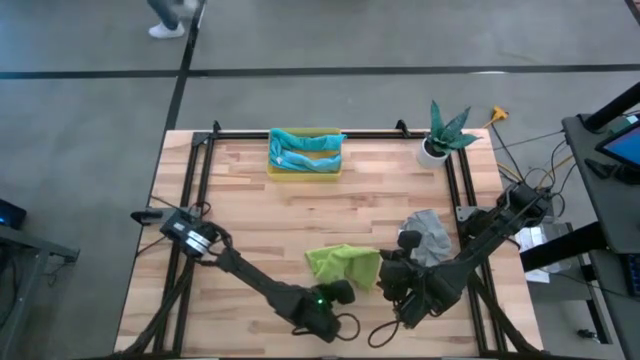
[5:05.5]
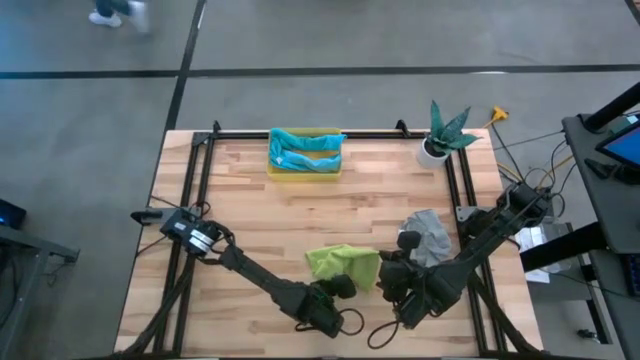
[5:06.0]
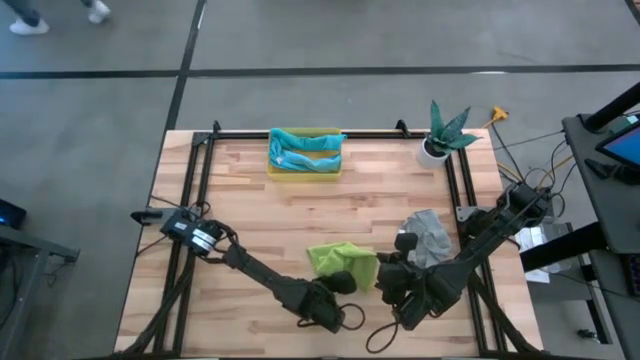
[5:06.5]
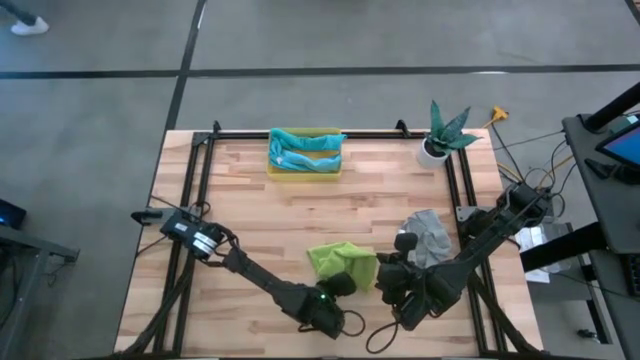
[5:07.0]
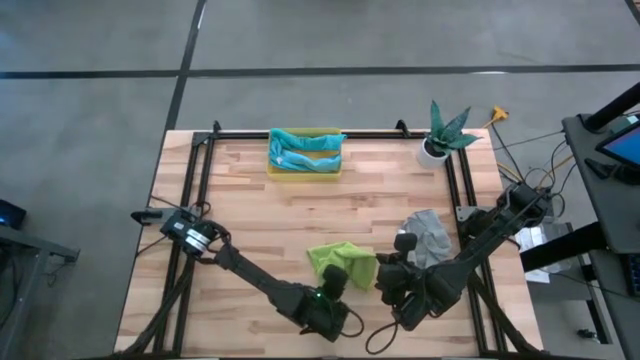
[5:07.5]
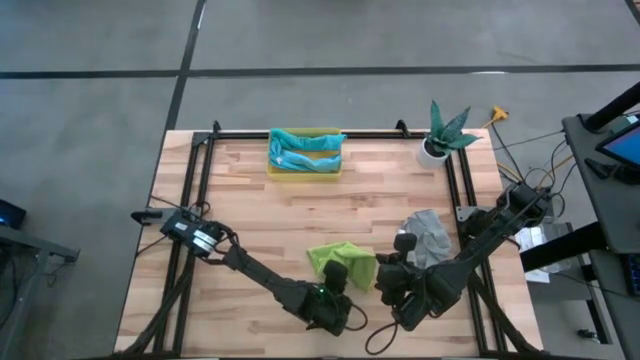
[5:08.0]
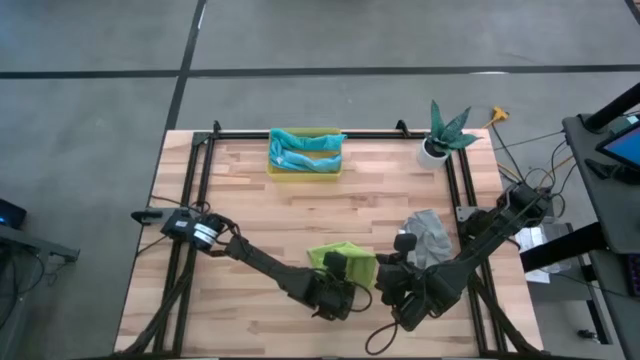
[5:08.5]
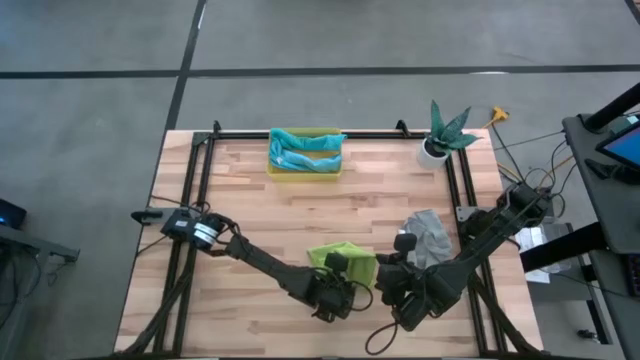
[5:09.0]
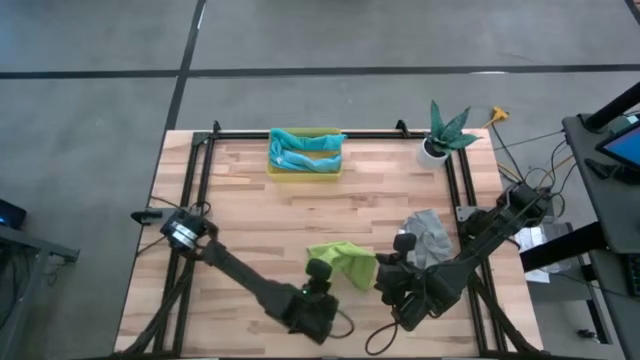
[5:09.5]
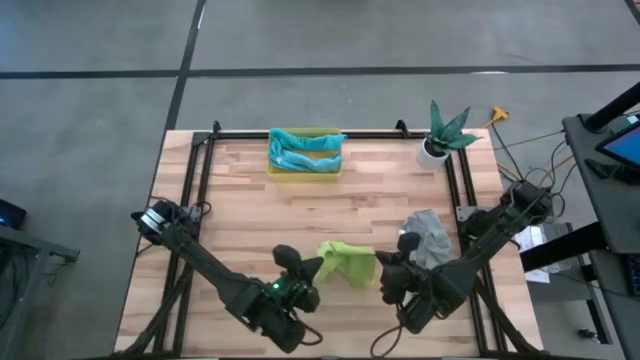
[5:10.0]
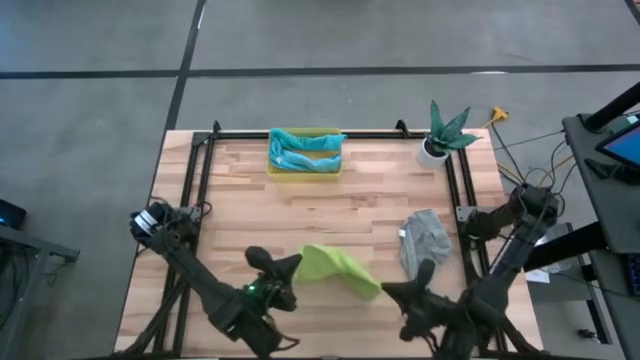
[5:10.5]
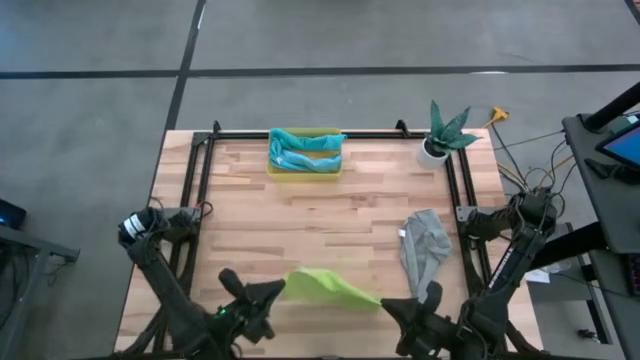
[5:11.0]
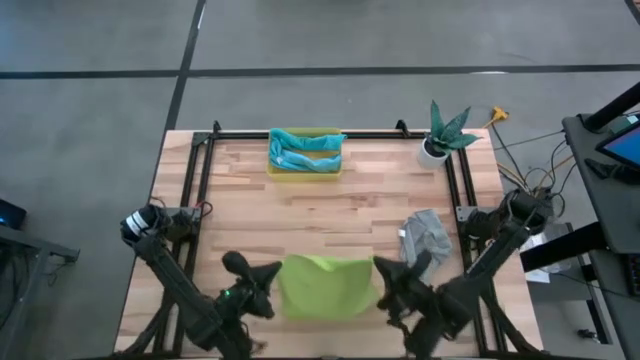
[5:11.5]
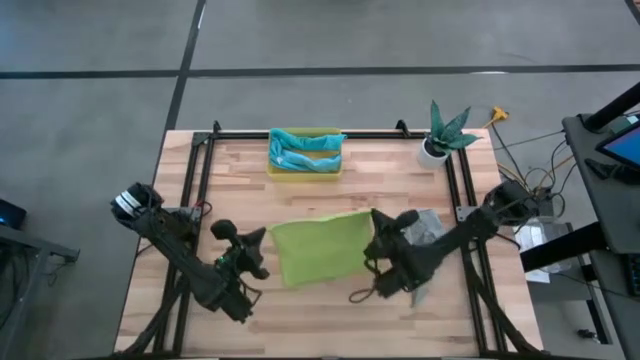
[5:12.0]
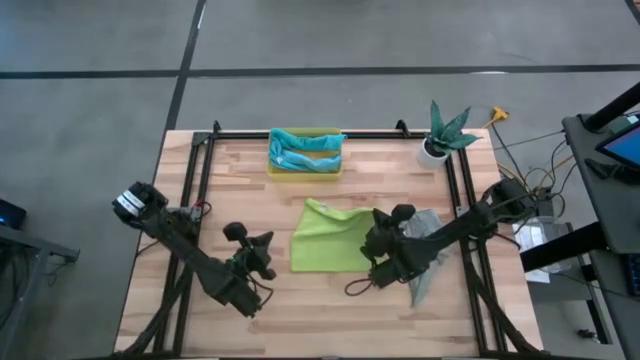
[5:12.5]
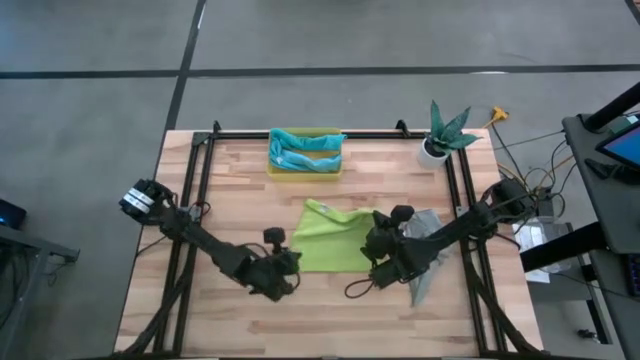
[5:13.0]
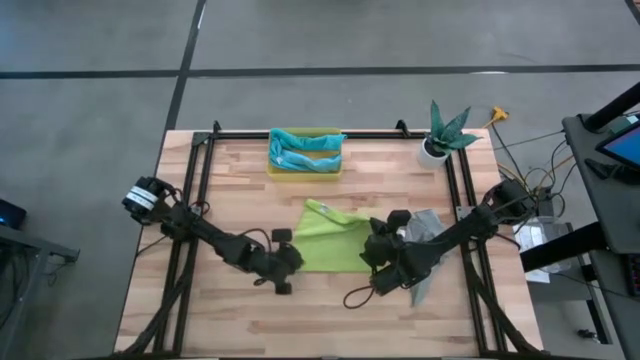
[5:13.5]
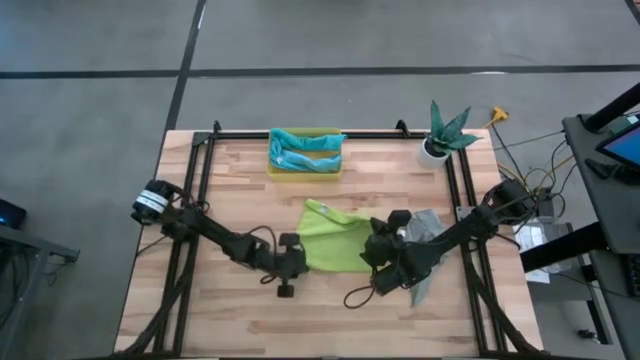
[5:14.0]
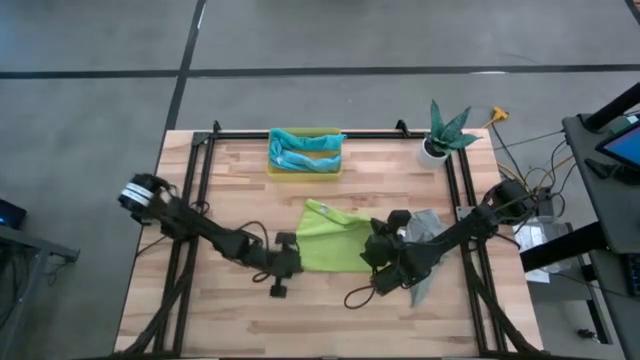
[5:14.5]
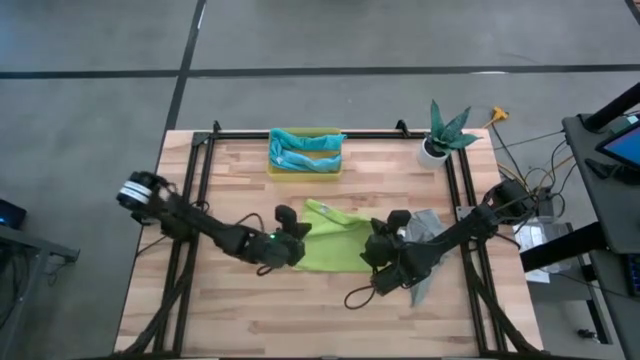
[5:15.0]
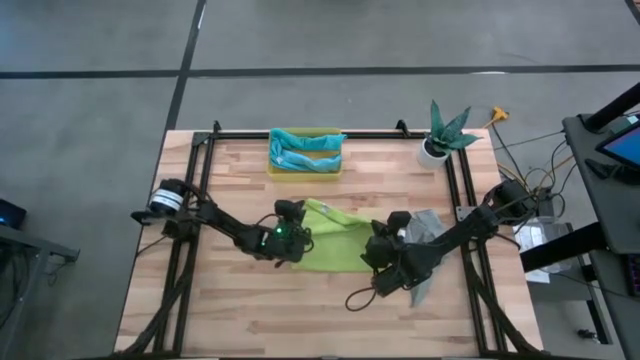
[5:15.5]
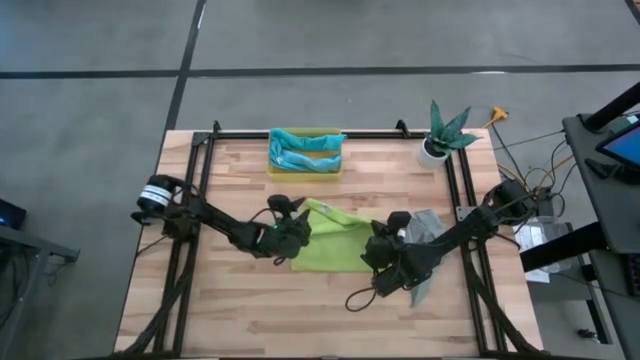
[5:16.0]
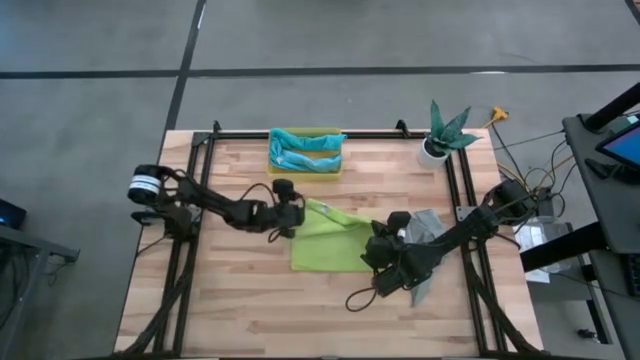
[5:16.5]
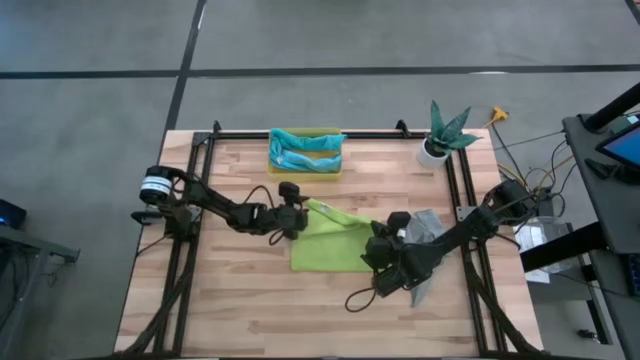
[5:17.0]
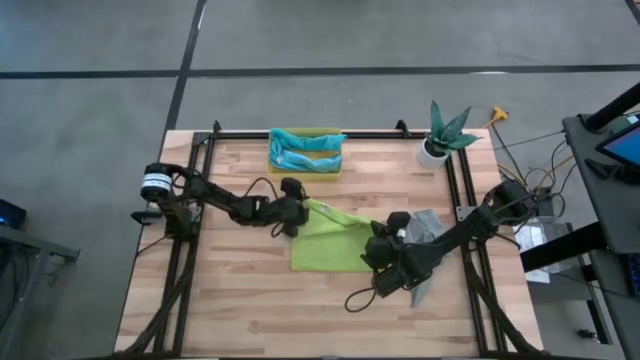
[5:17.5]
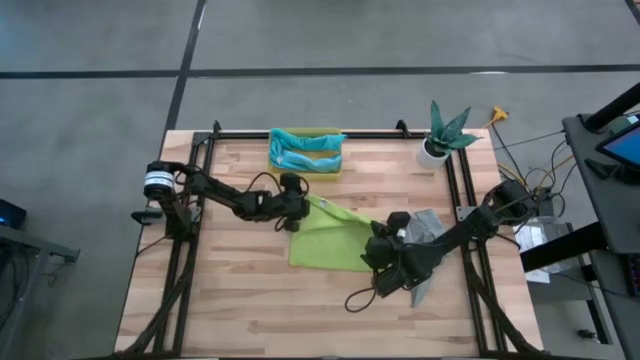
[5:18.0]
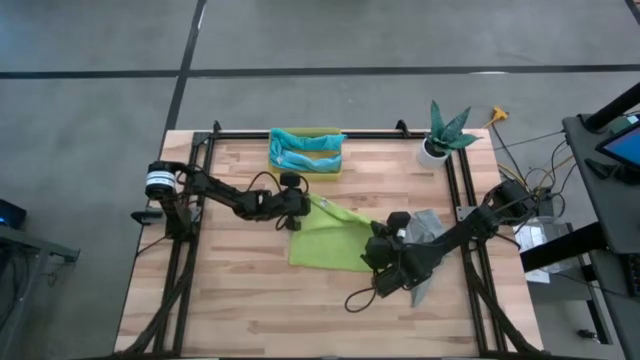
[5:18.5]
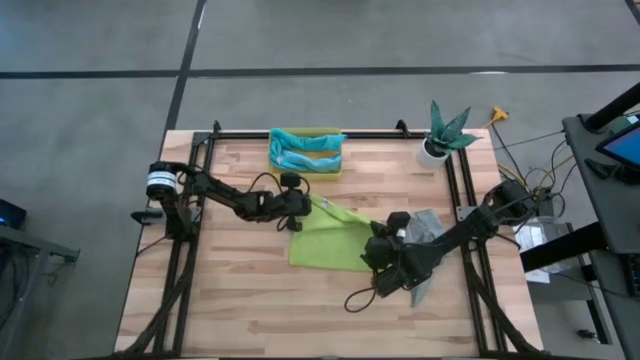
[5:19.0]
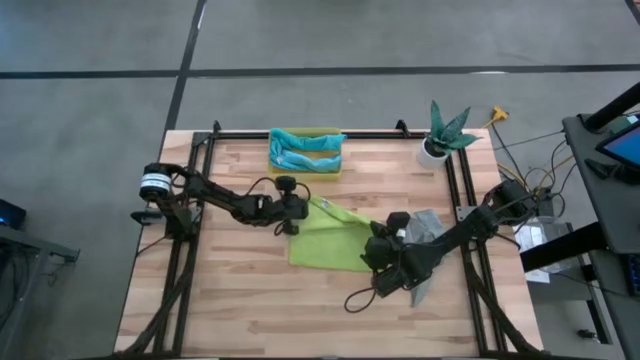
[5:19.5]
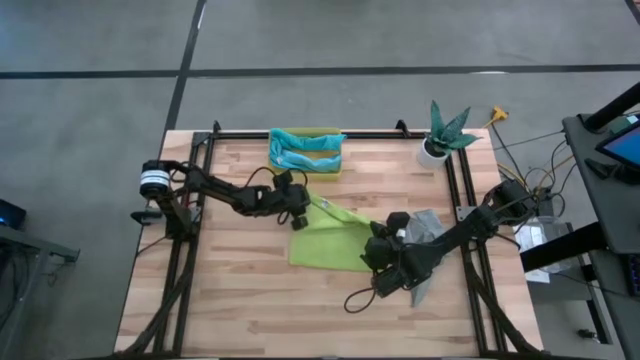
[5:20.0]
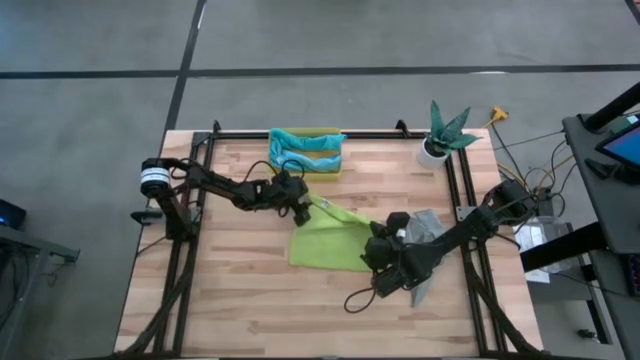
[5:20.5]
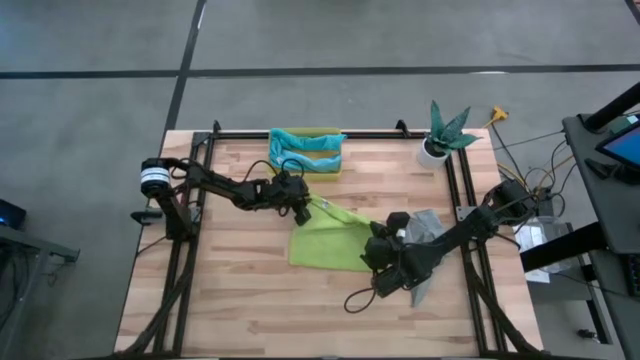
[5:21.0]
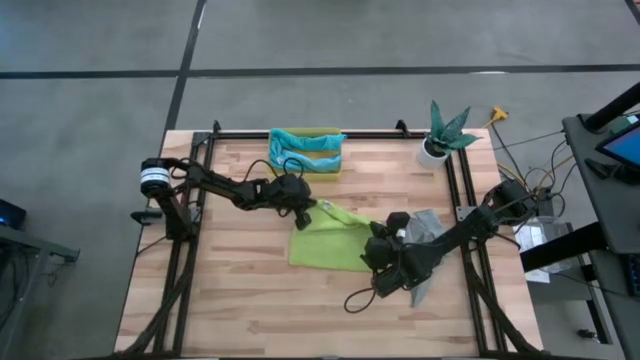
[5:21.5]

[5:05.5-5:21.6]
Task: Roll microfiber towels into tight, uniform cylinder then place into a basket
Roll the green towel

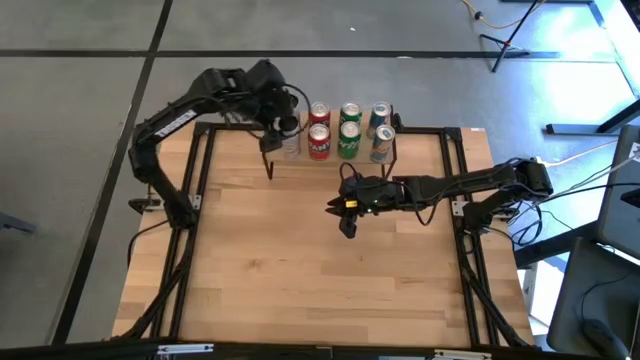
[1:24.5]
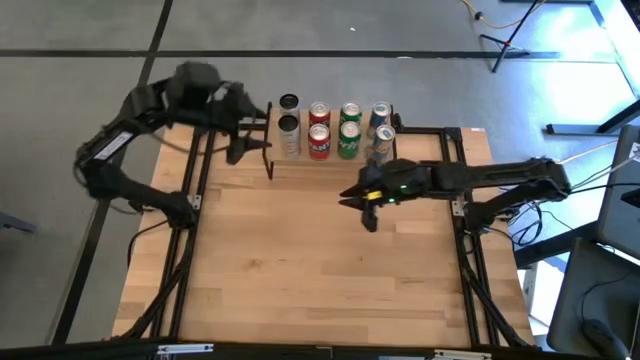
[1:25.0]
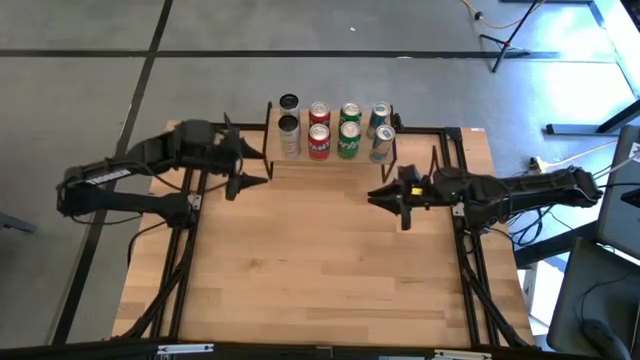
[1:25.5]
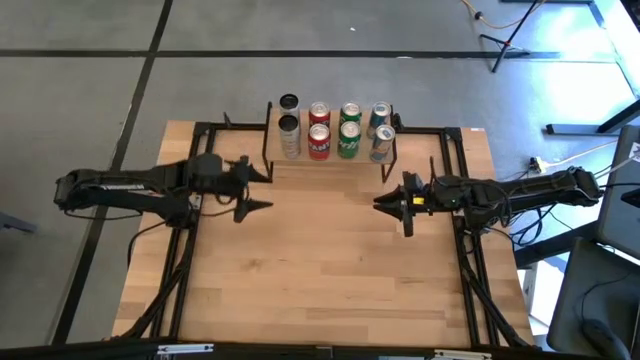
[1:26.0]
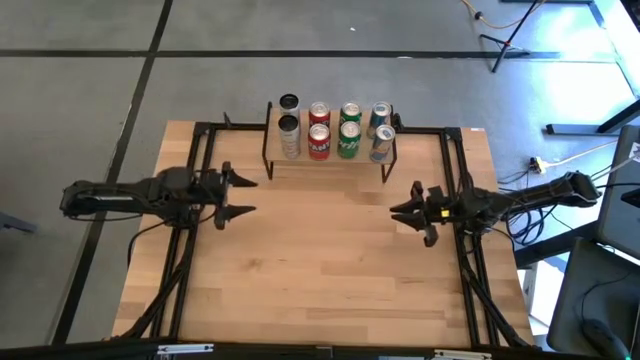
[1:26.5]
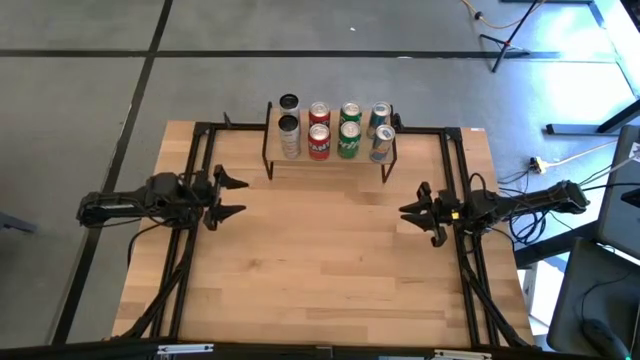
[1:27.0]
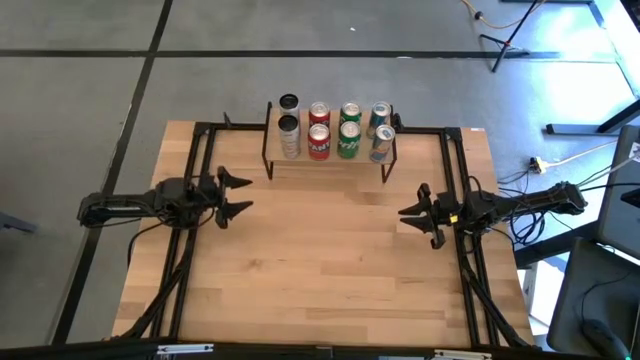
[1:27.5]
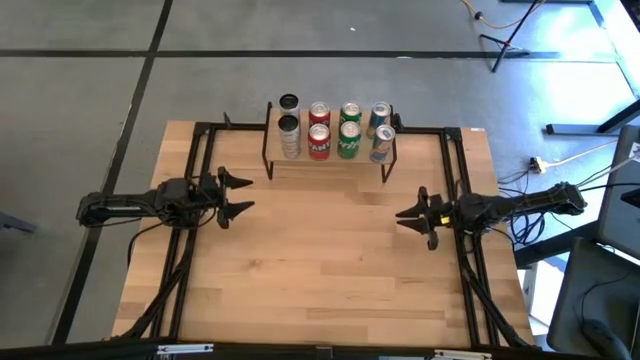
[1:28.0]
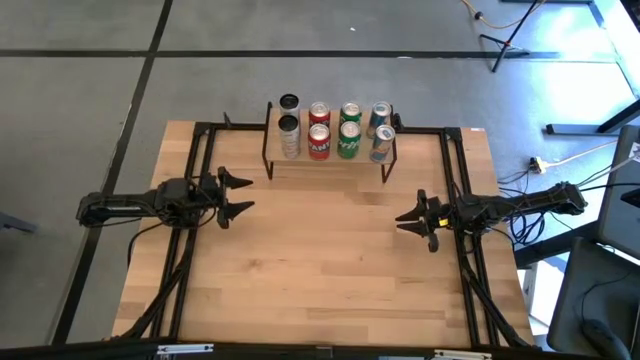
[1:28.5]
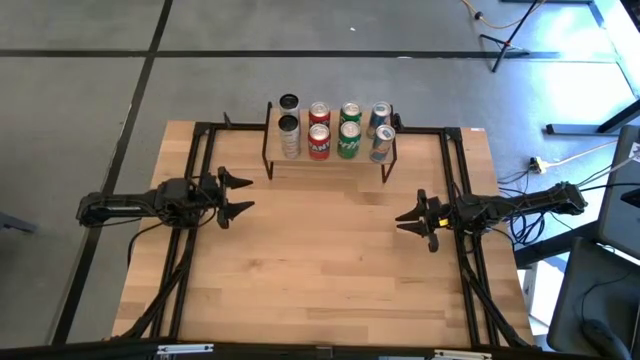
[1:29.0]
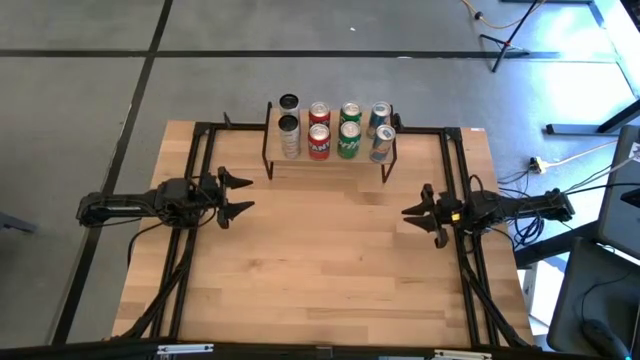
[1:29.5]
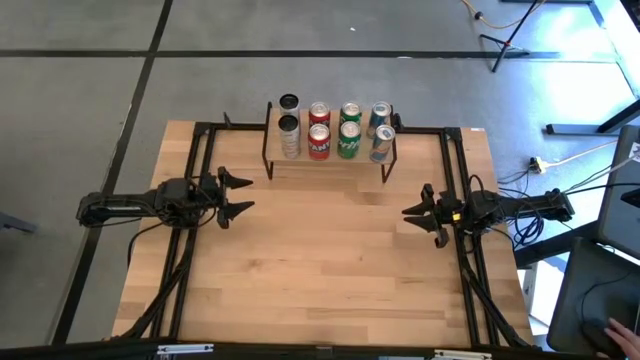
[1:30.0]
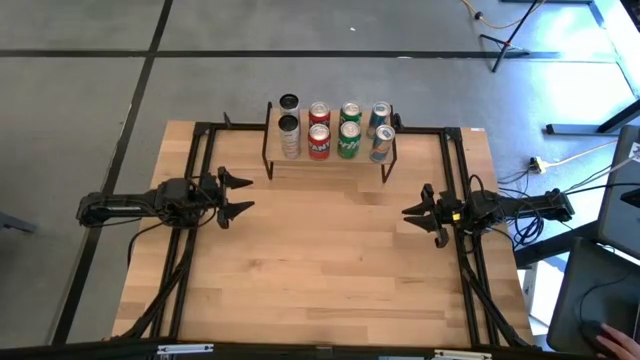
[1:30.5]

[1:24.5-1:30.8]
Task: Place canned beverage on shelf
Return to Home Position
